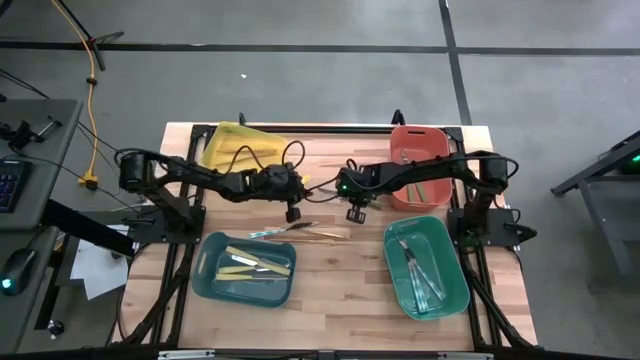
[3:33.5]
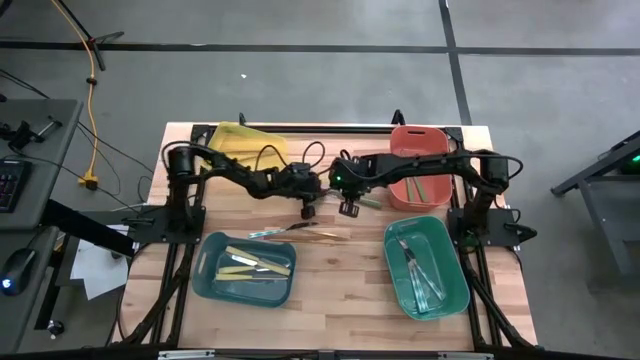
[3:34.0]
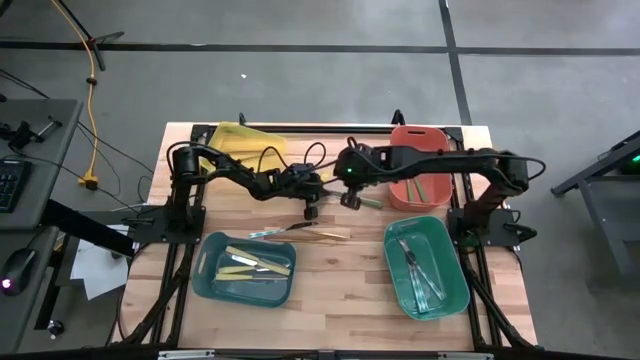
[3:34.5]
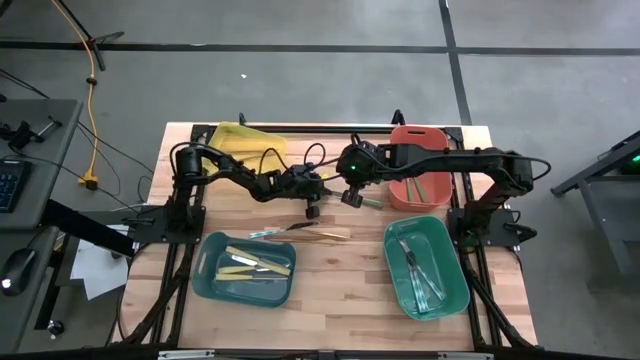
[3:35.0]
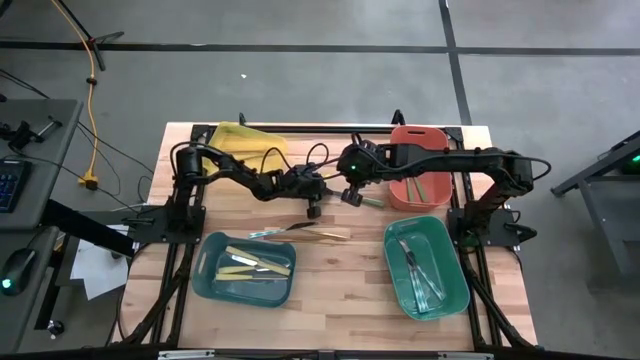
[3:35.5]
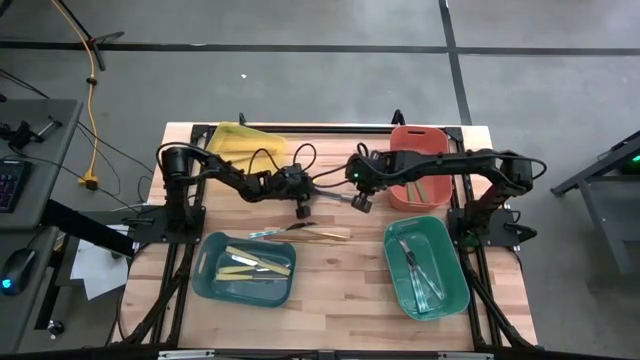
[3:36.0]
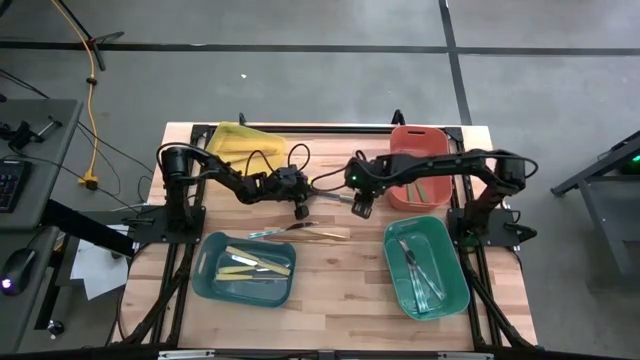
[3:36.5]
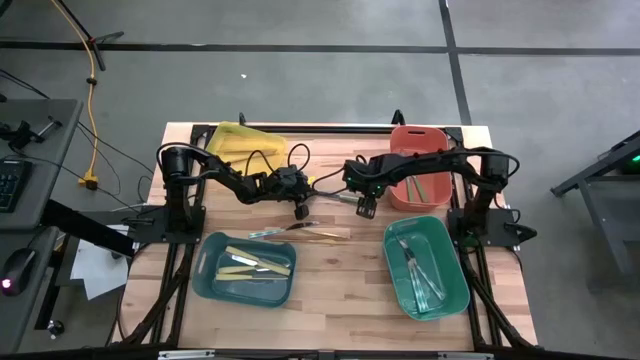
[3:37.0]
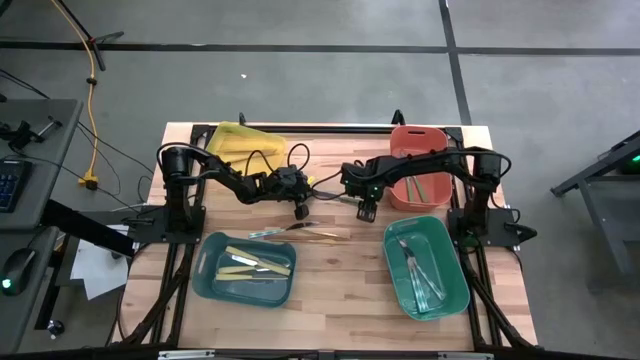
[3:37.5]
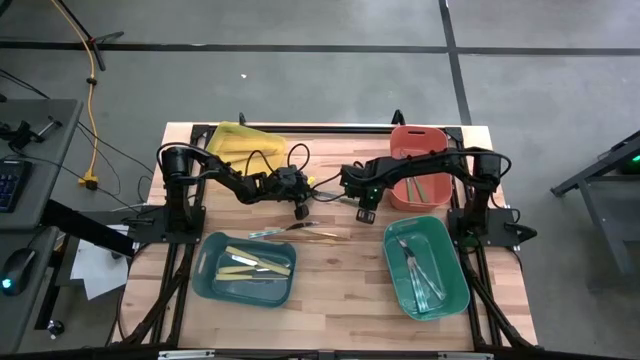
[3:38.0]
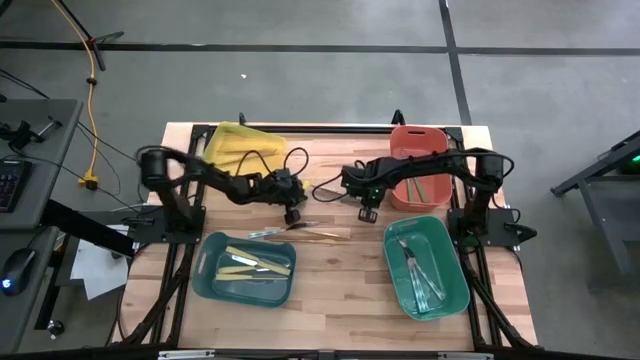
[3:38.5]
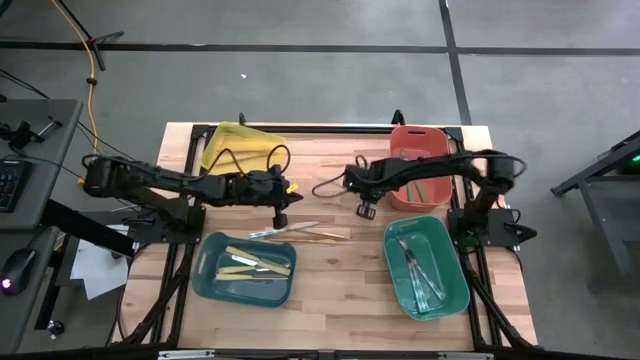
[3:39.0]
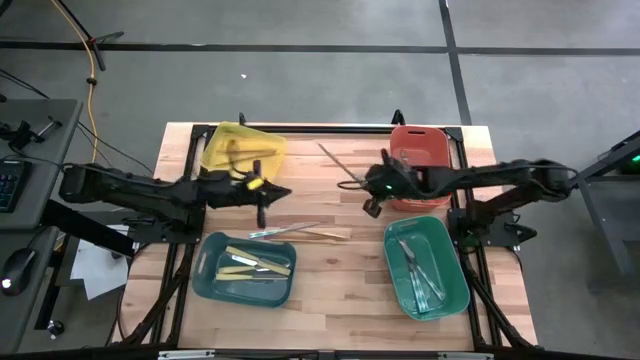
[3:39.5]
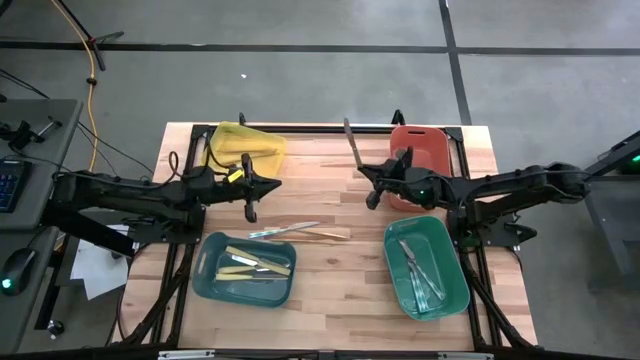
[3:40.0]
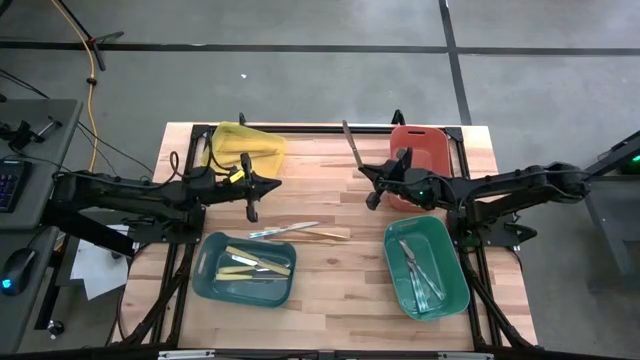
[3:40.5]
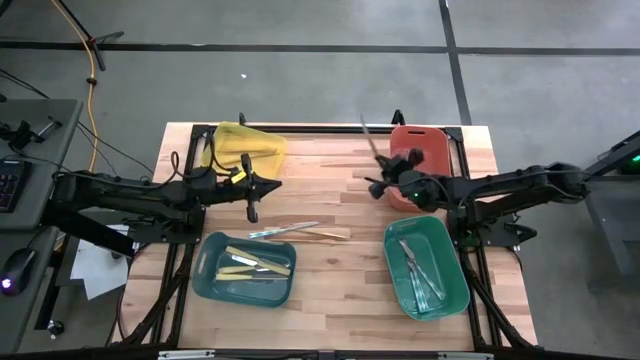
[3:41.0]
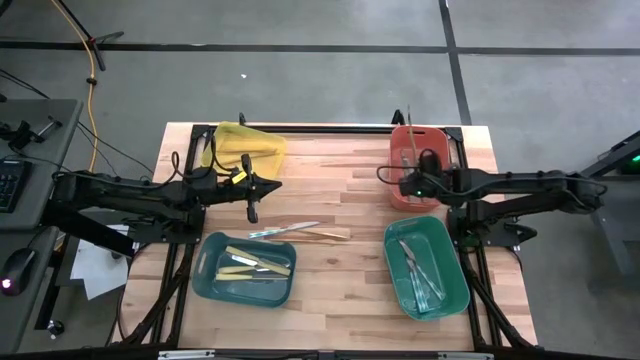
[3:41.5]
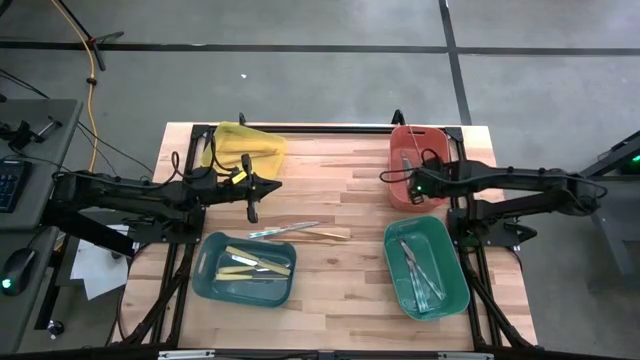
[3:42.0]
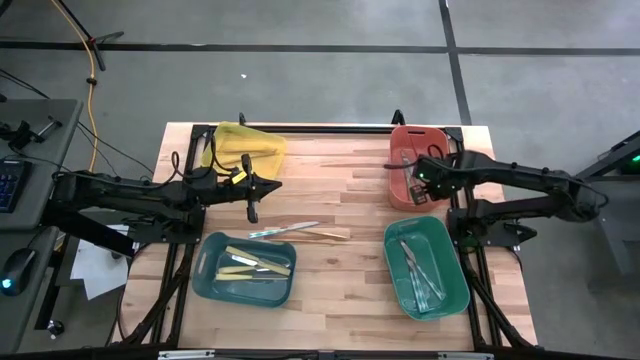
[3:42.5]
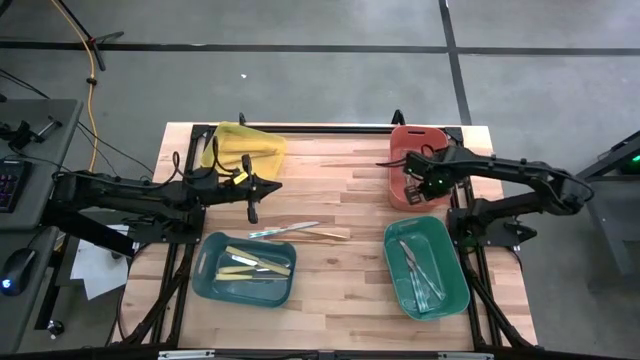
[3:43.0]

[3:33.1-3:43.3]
Task: Sort silverware by color (type)
Put the green knife into the orange bin

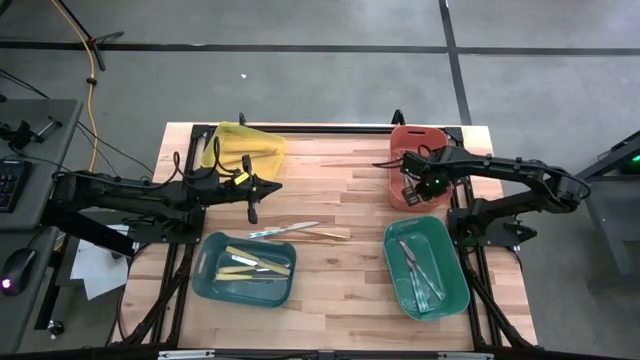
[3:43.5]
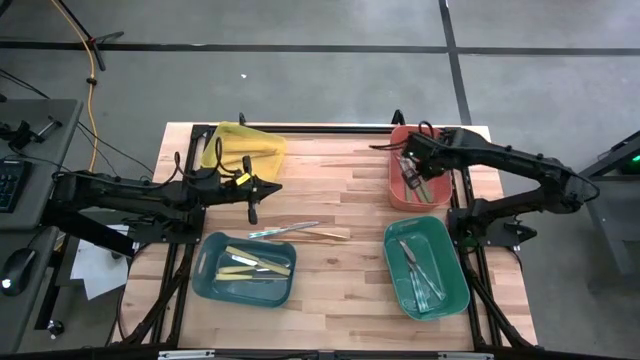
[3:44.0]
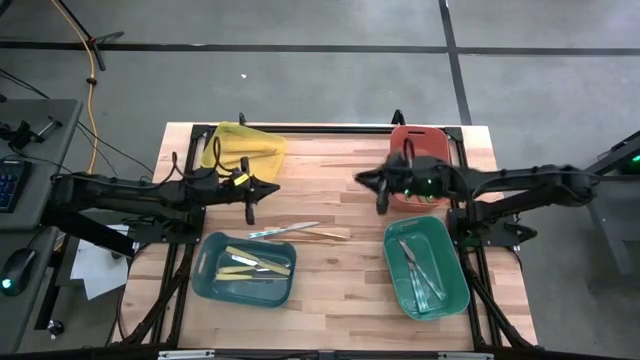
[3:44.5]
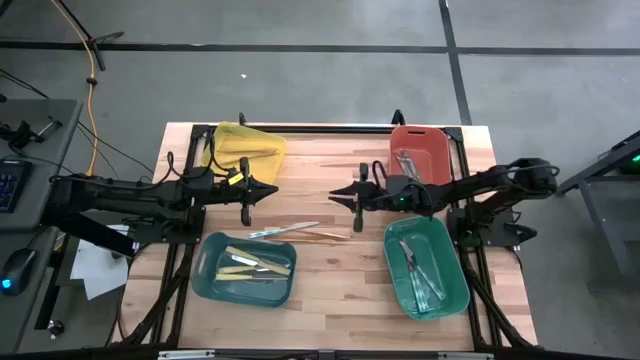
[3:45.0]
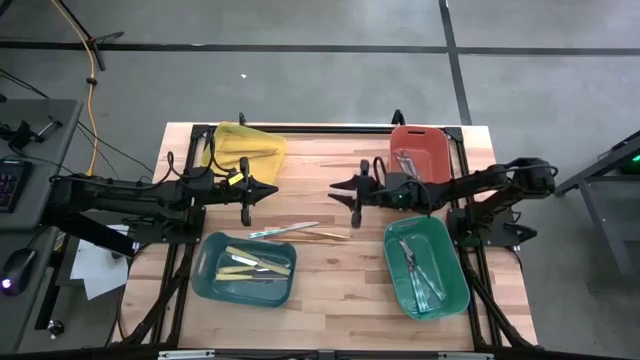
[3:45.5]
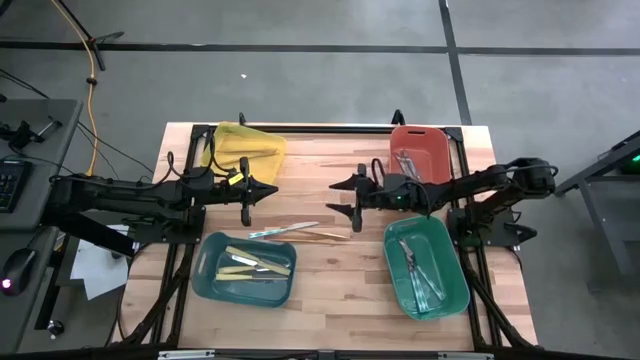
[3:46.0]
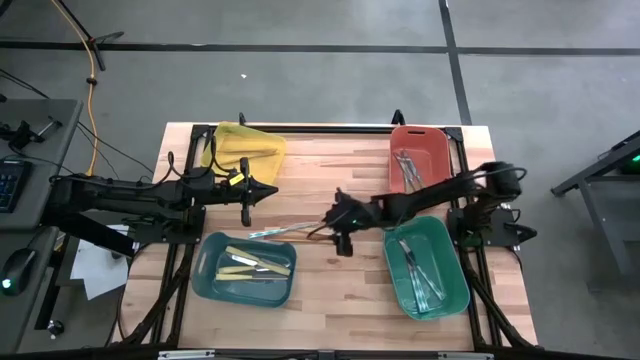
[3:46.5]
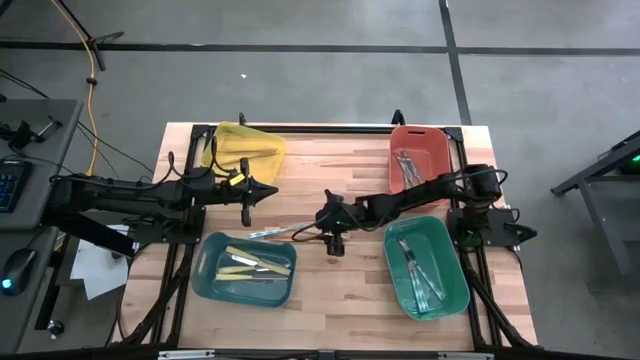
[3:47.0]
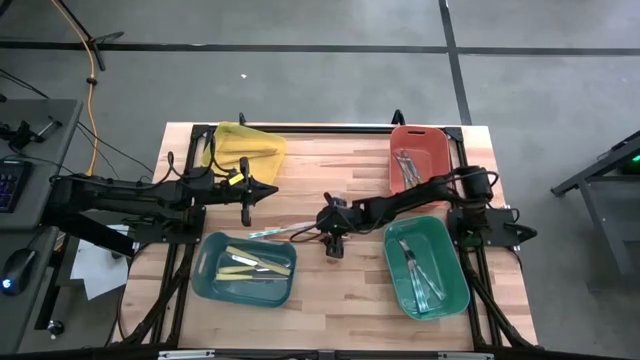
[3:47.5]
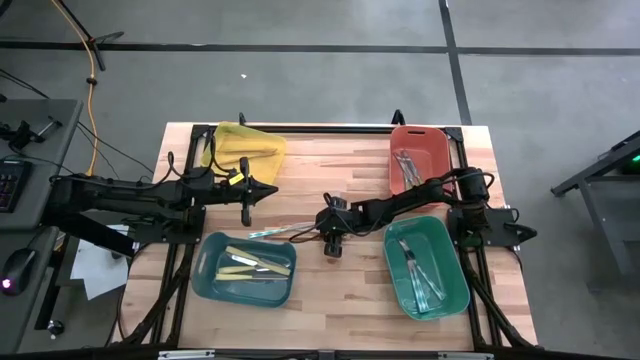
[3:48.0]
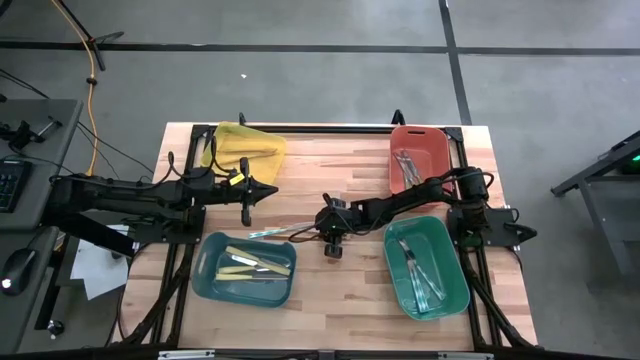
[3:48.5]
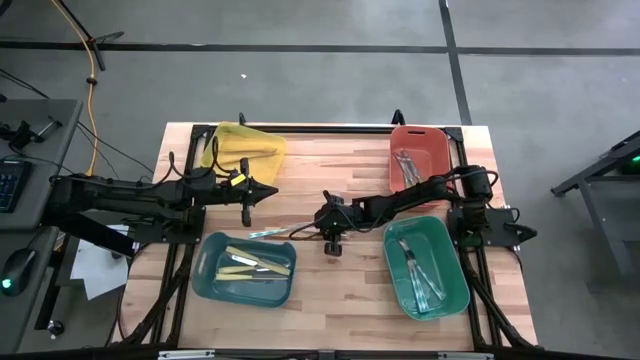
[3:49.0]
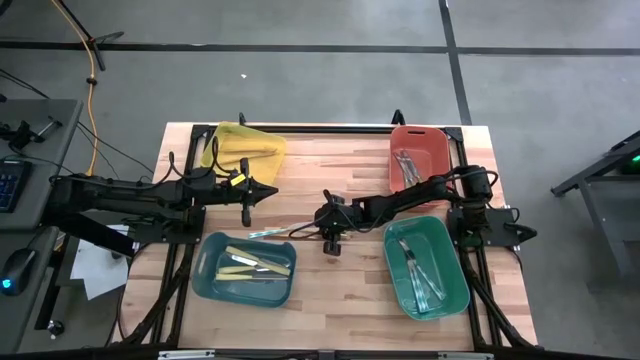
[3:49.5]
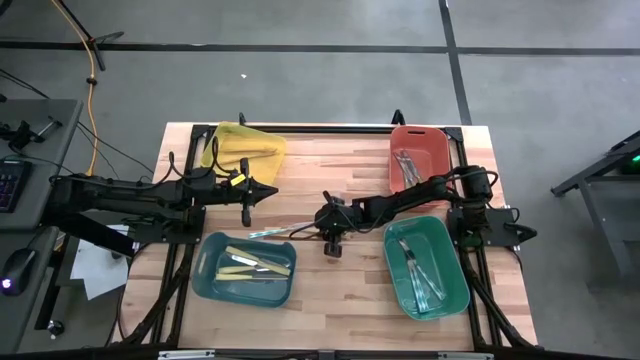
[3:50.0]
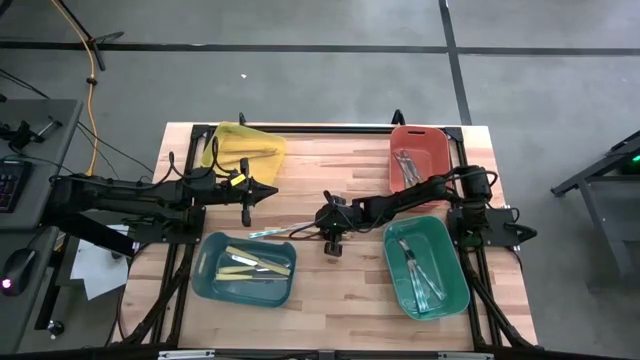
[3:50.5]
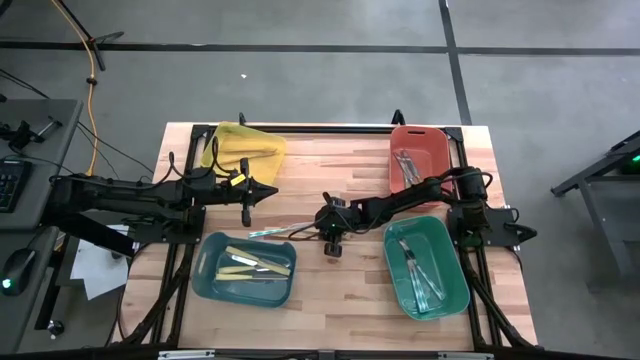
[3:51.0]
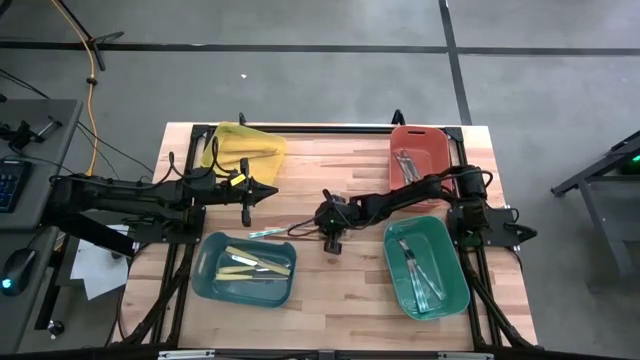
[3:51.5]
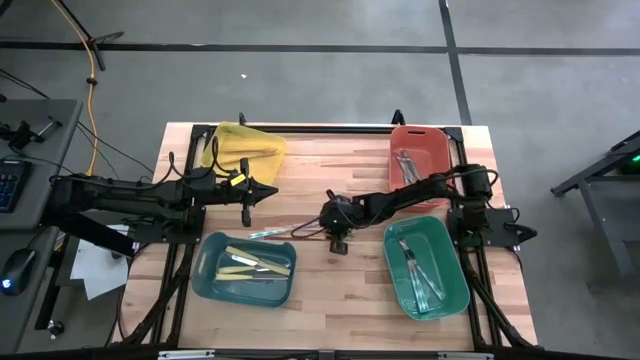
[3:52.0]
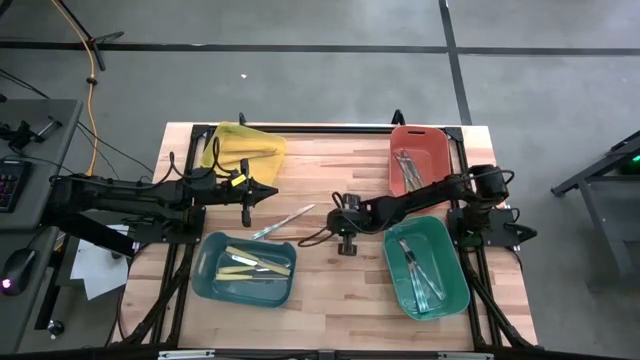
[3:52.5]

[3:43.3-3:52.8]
Put the gold knife into the yellow bin

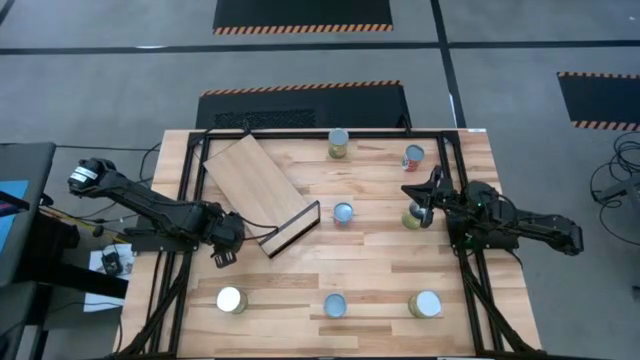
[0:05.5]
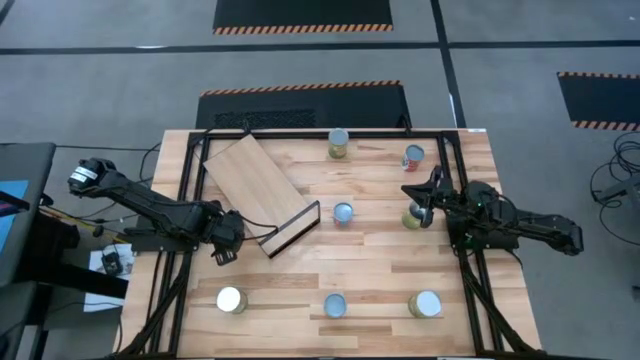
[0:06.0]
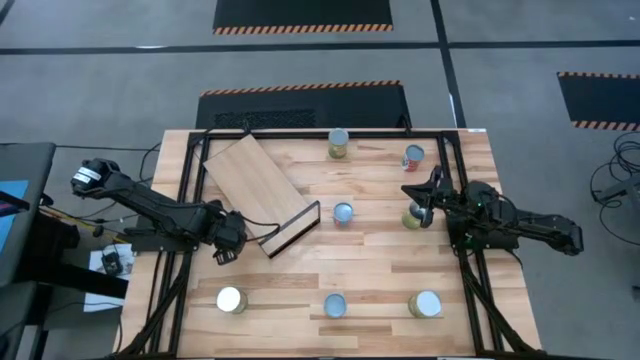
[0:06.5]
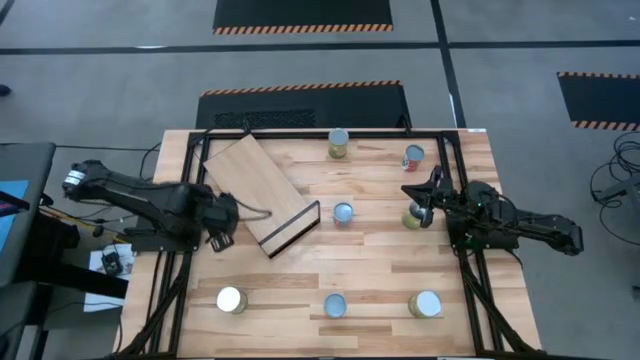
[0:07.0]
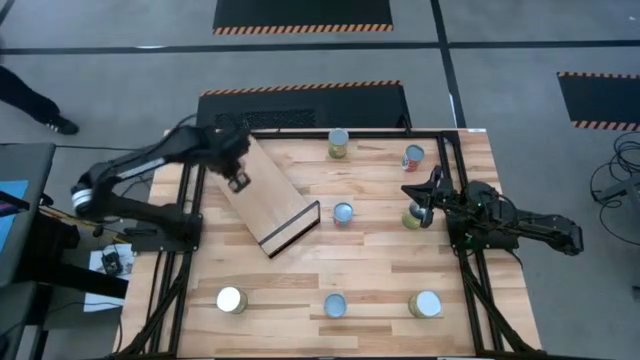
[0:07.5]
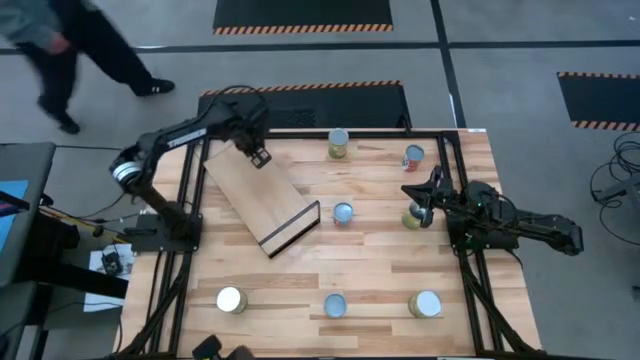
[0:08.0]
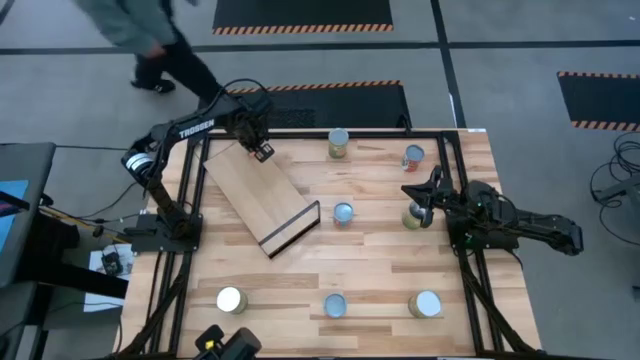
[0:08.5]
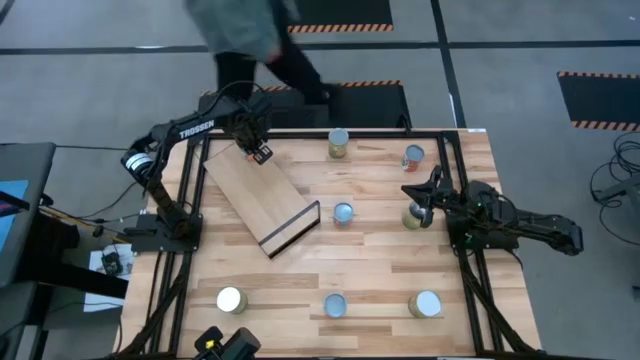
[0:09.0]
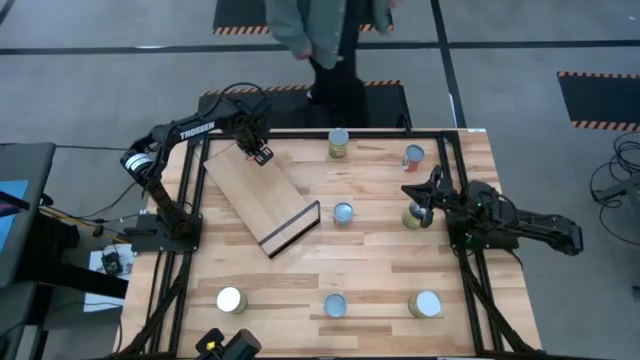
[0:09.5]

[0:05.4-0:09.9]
Task: Pick and place cans onto a shelf
Put the small canned oranges on the shelf
